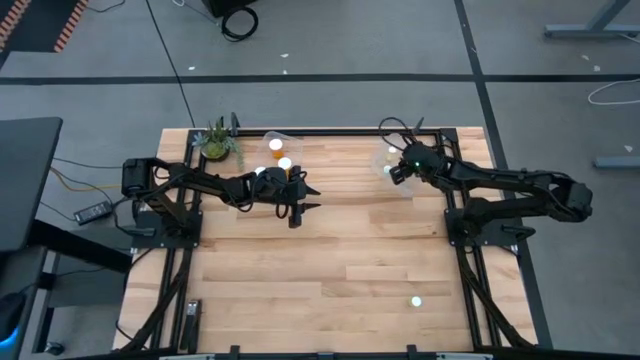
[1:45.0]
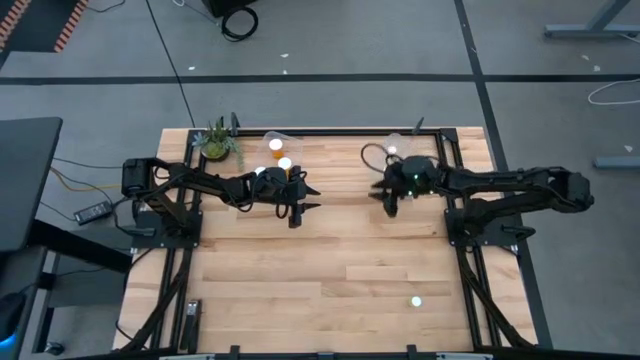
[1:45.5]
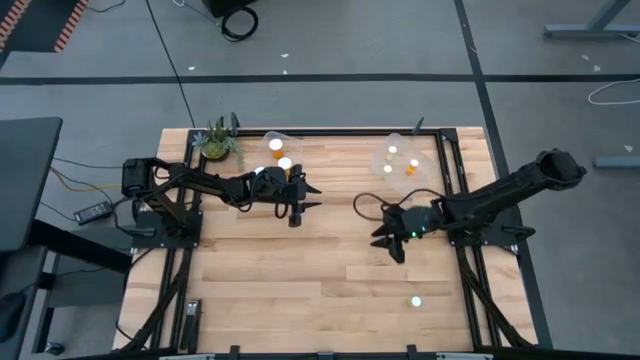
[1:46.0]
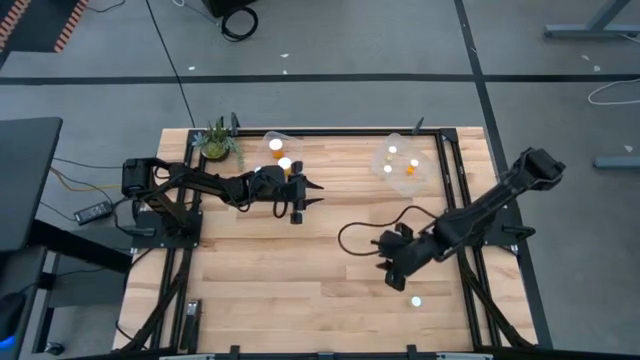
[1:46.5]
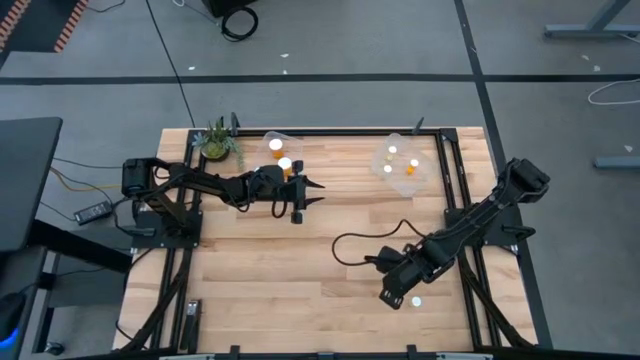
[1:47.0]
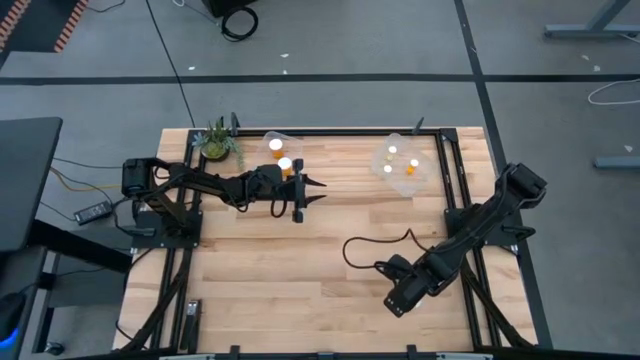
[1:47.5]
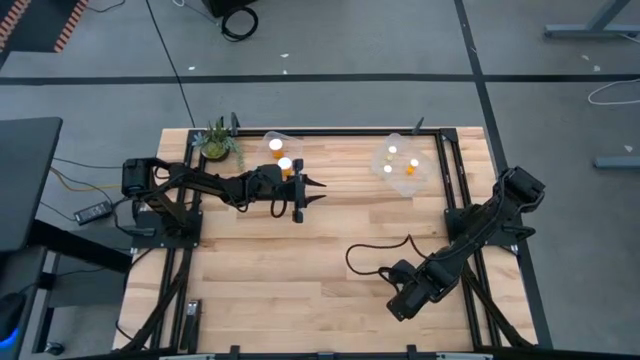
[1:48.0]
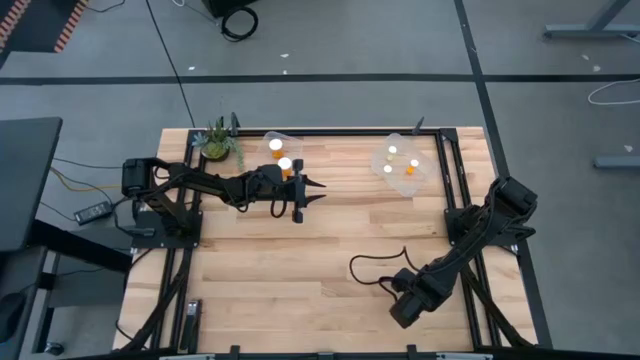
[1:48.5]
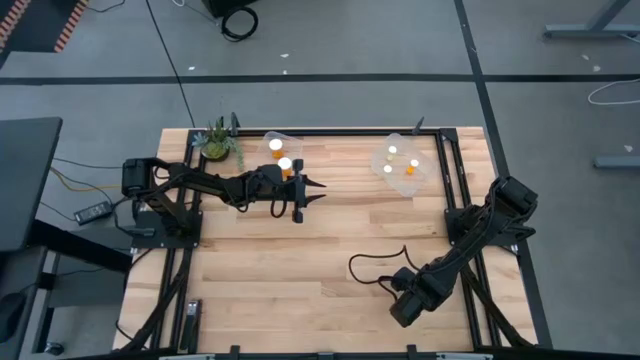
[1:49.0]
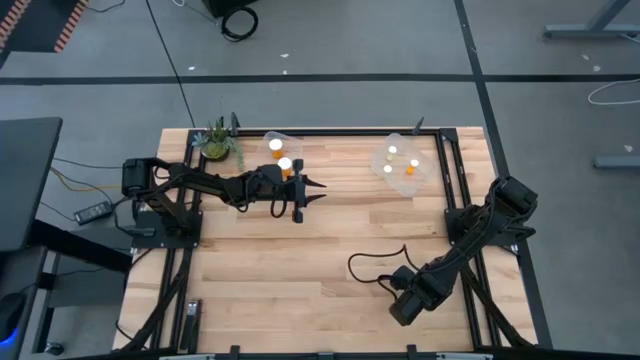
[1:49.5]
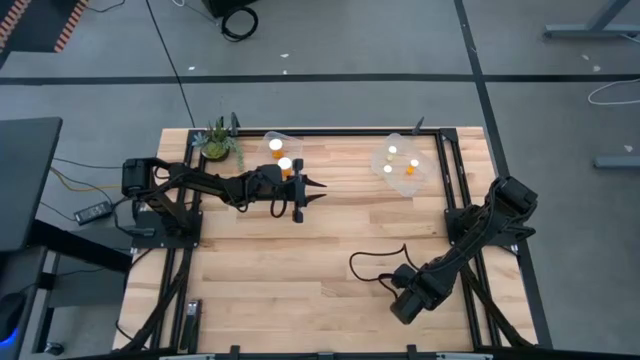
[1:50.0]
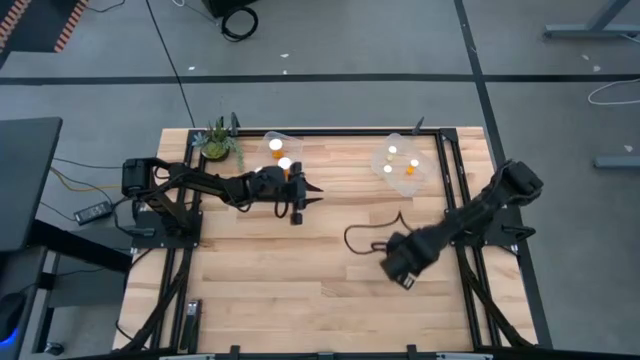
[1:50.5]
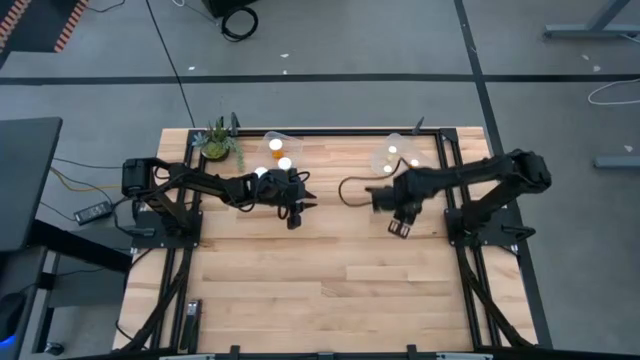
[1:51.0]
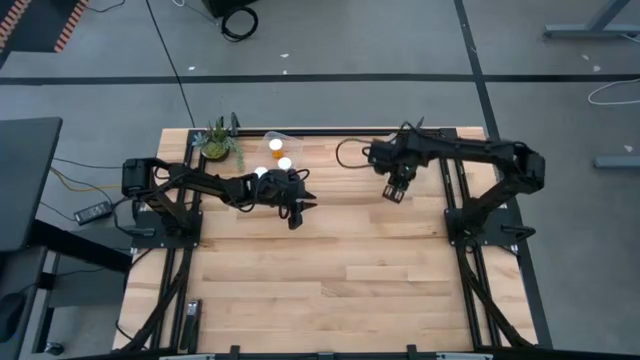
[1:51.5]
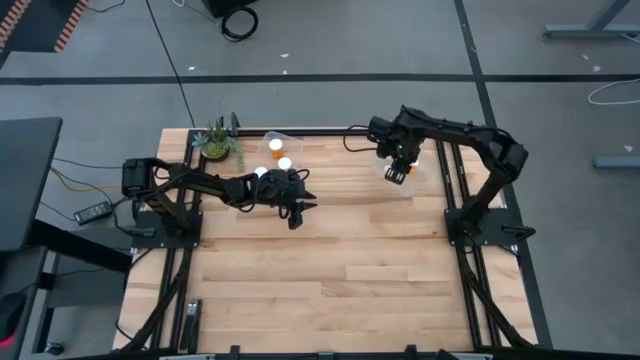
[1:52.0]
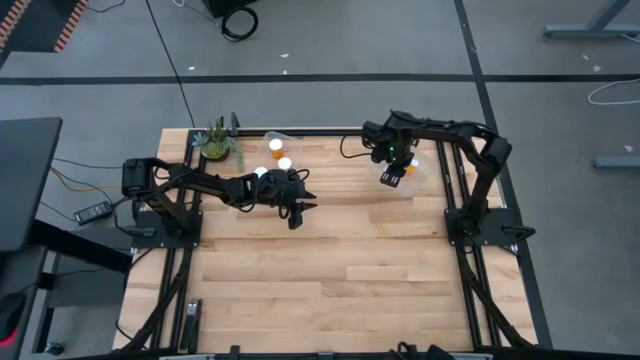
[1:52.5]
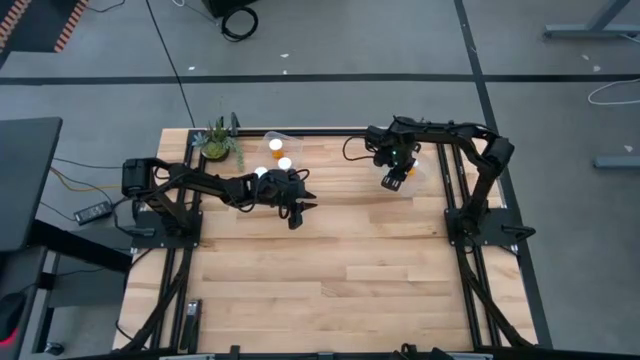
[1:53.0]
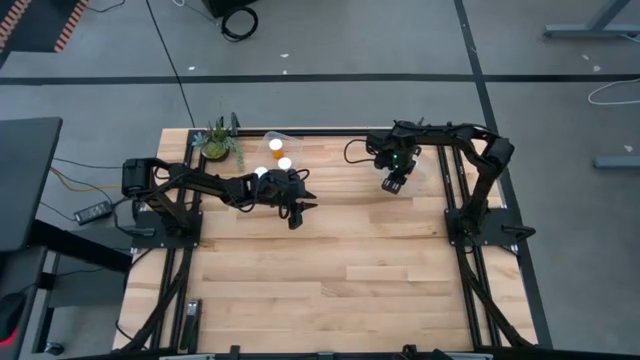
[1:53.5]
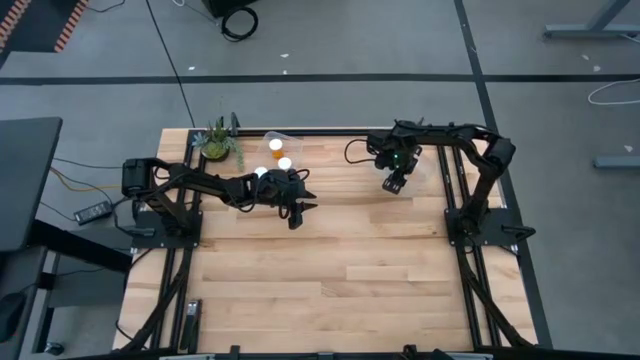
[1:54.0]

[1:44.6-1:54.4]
Task: Pick and place medicine bottles into bin by pill shape (circle, oval)
Put the small yellow pill bottle into the right transparent bin

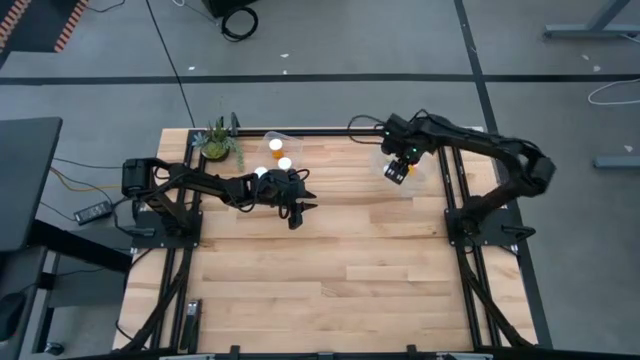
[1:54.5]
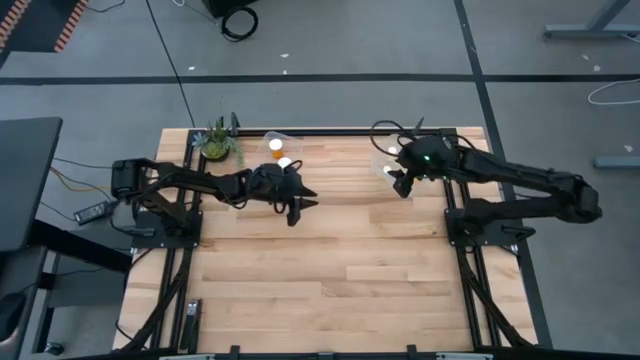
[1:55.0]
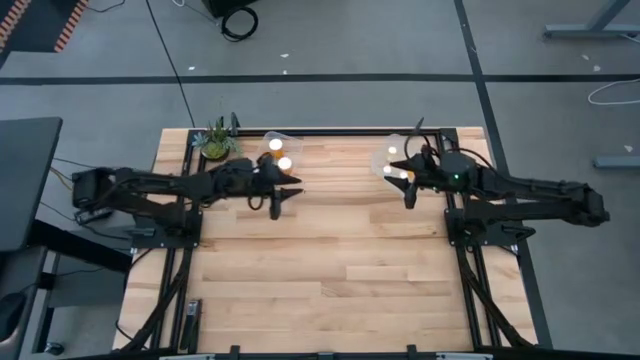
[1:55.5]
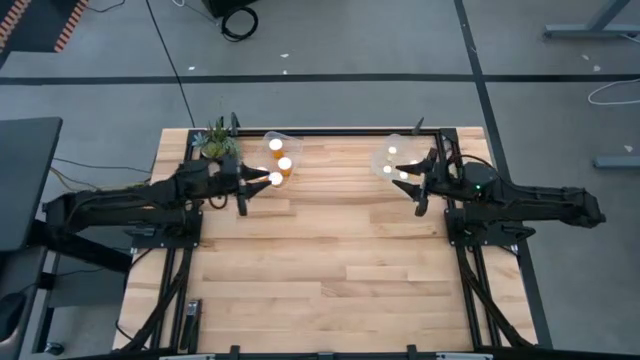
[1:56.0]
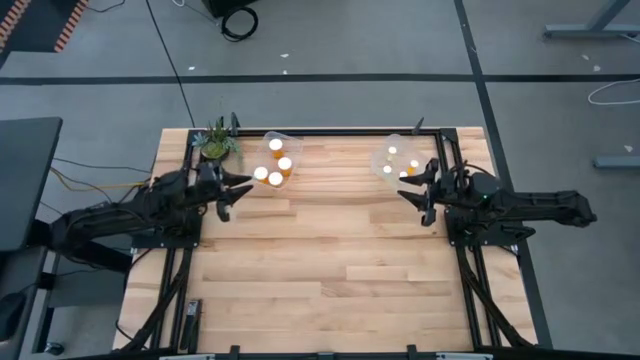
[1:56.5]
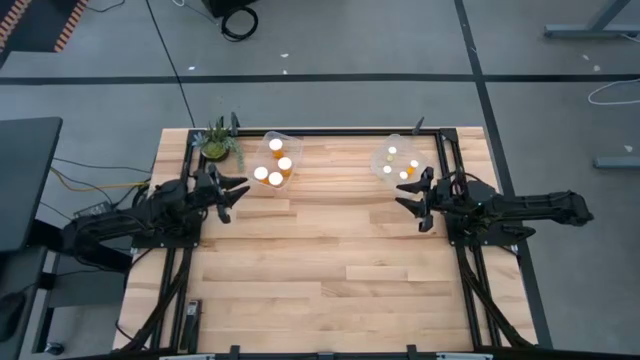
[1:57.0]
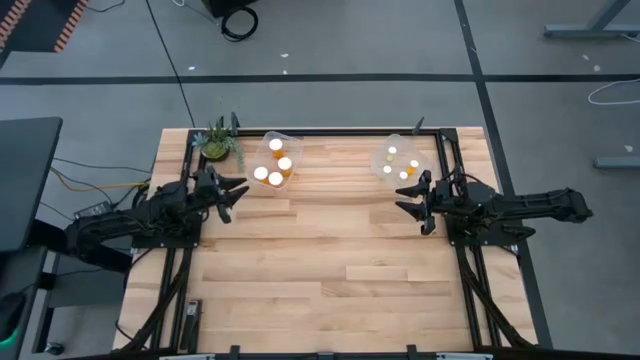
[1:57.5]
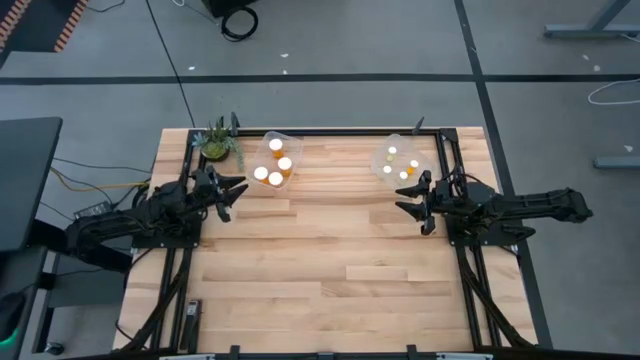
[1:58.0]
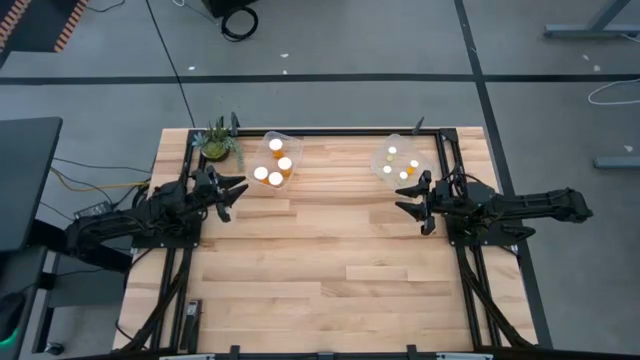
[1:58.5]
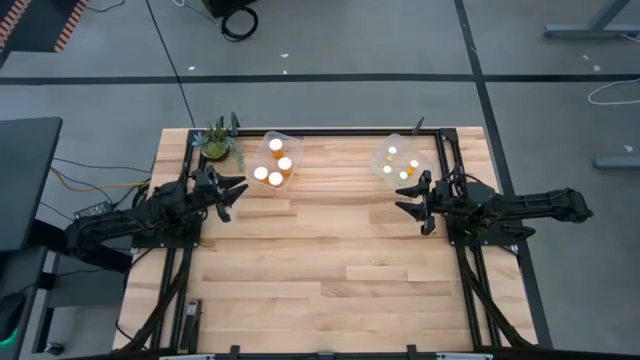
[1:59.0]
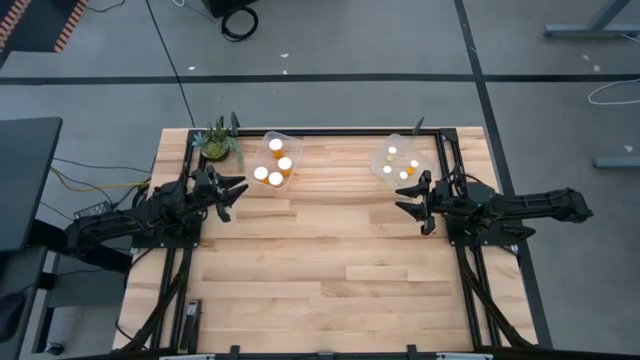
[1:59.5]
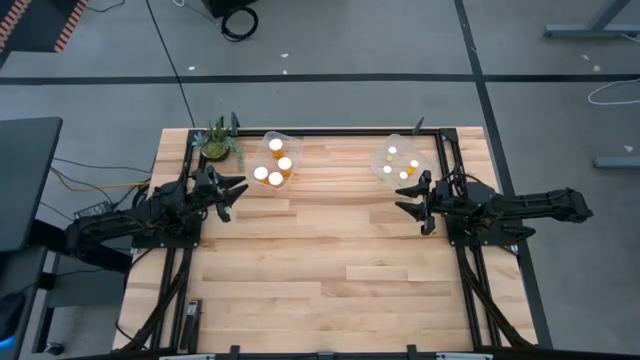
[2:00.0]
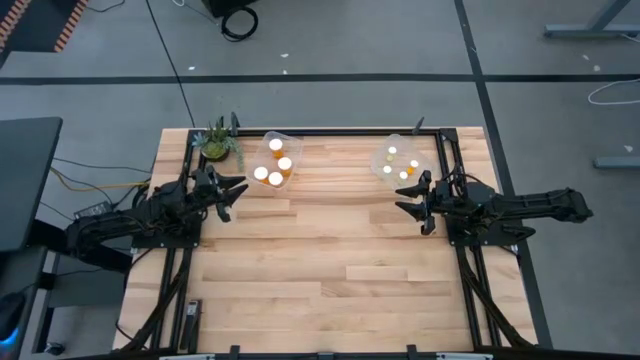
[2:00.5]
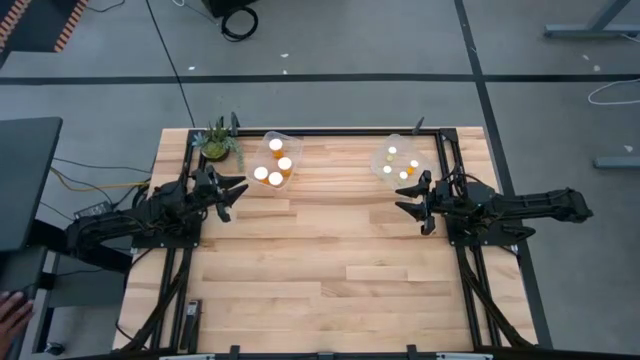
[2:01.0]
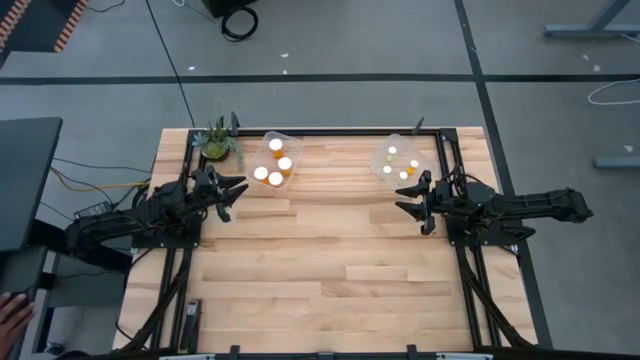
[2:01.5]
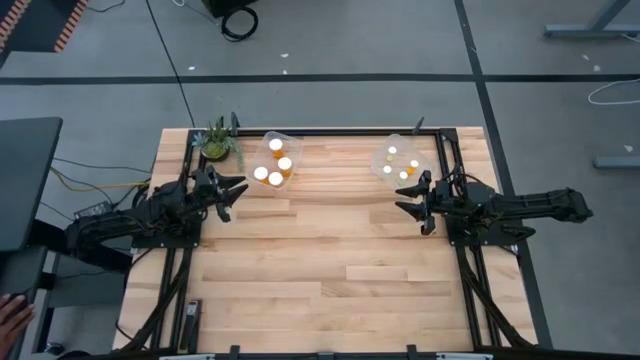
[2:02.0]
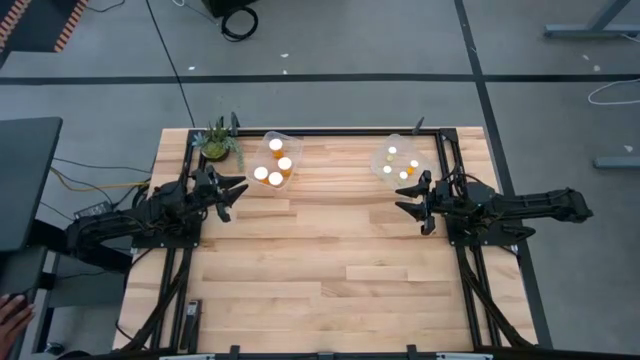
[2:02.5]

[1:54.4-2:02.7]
Return to Home Position

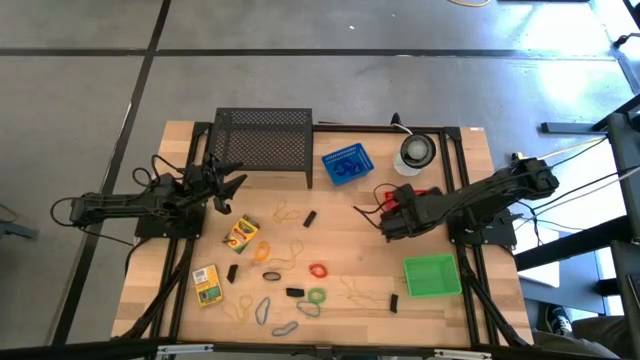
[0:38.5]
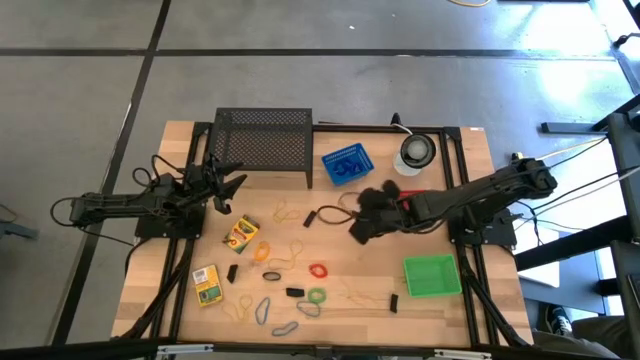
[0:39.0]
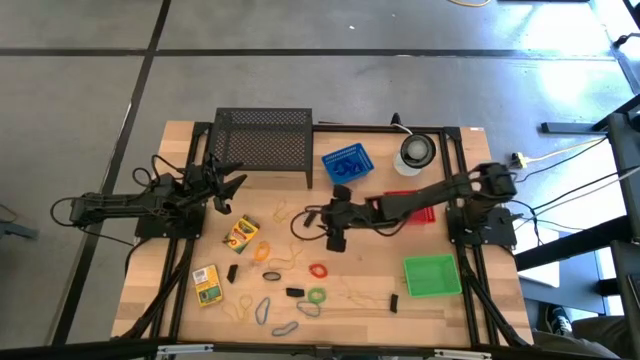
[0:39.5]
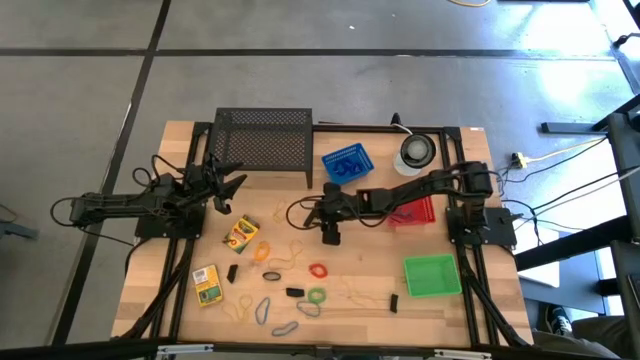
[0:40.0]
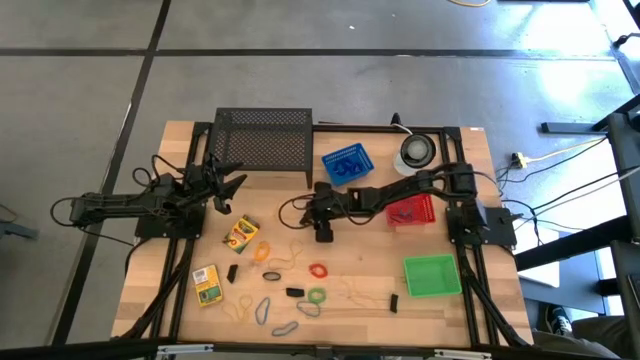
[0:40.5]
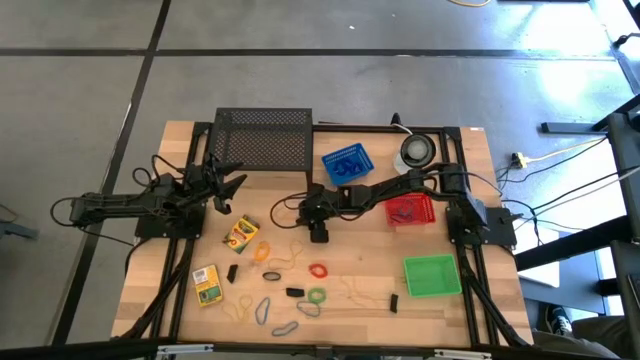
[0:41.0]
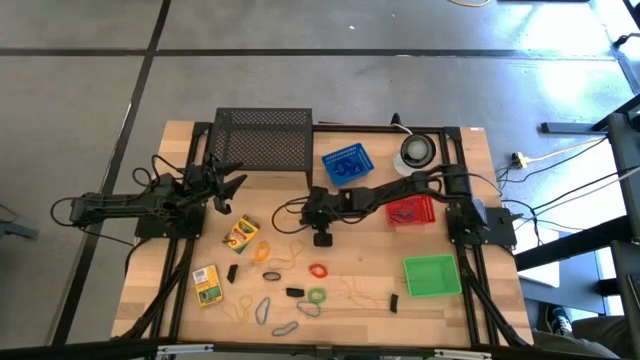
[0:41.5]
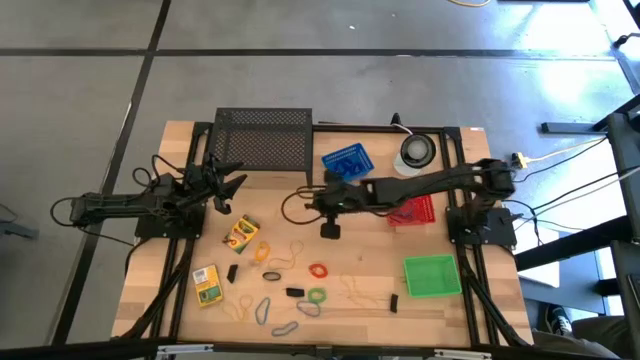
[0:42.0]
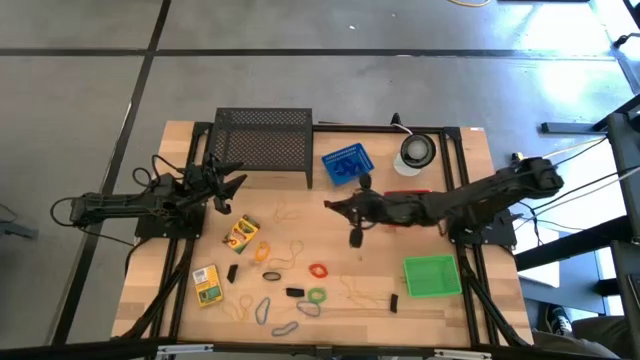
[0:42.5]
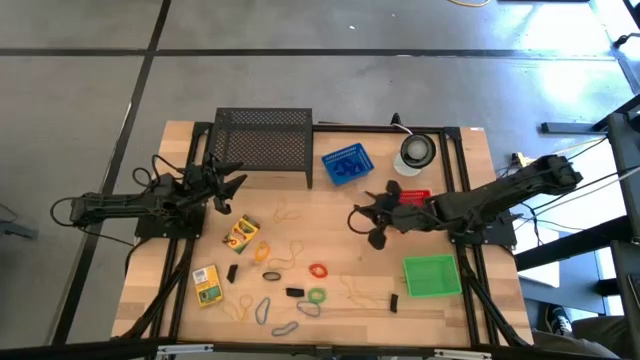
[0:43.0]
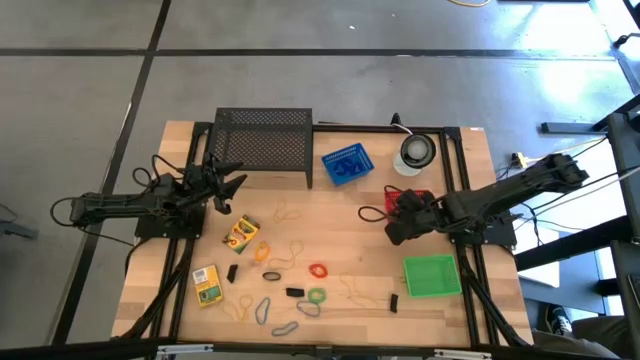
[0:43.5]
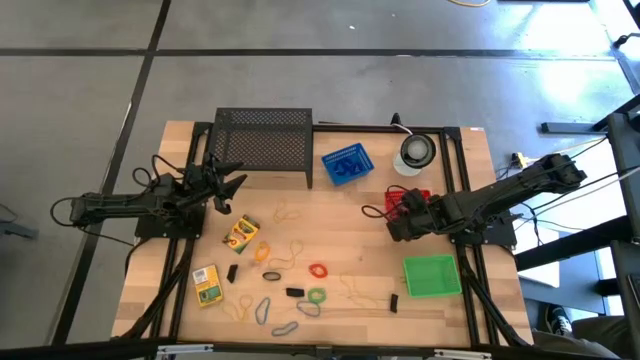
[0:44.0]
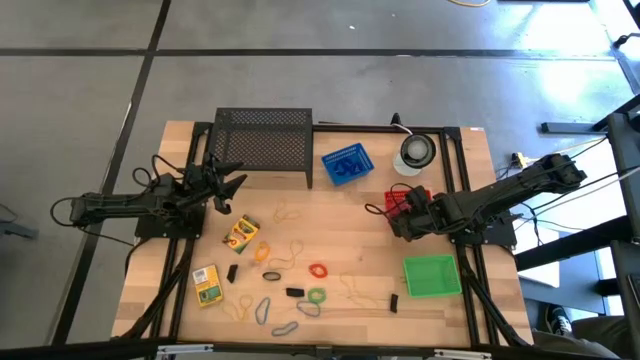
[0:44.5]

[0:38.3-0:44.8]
Task: Pick & Place Office Desk Supplies
Put the black arm band into the red bin
